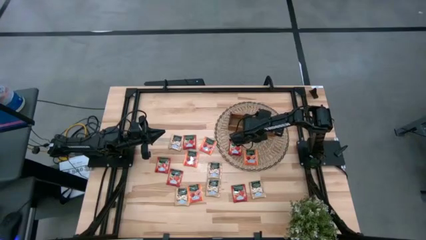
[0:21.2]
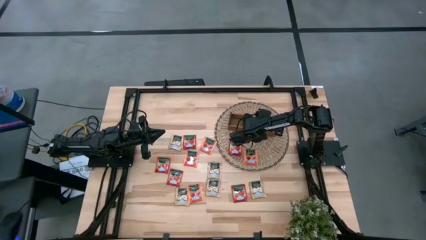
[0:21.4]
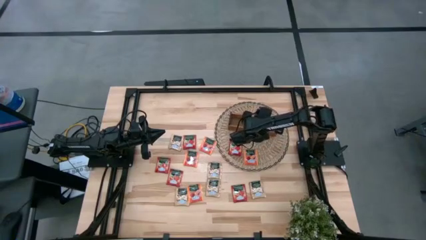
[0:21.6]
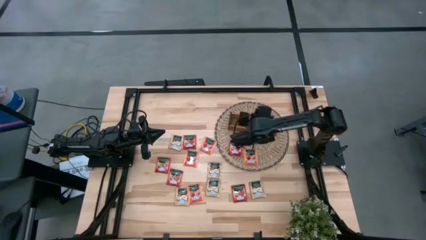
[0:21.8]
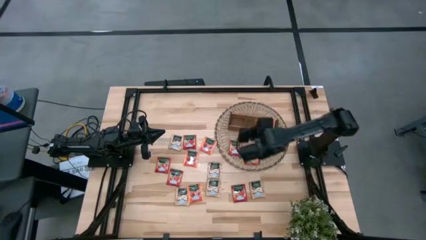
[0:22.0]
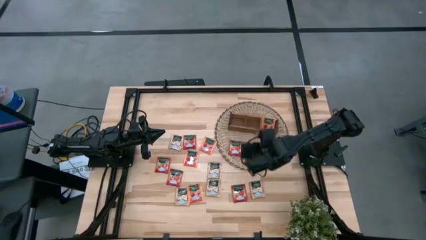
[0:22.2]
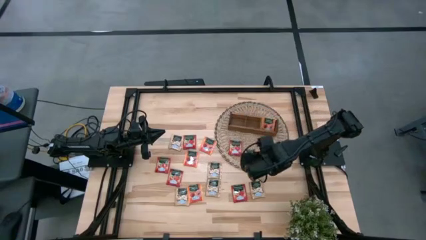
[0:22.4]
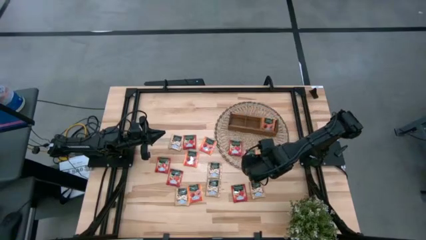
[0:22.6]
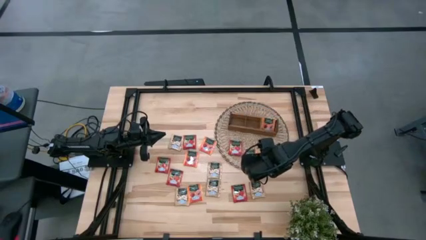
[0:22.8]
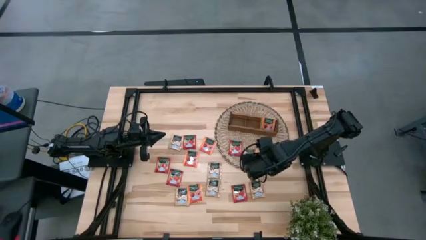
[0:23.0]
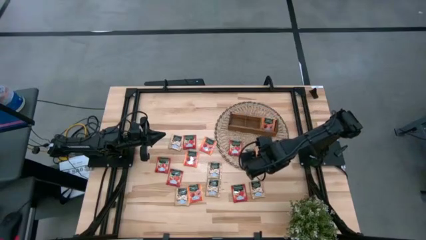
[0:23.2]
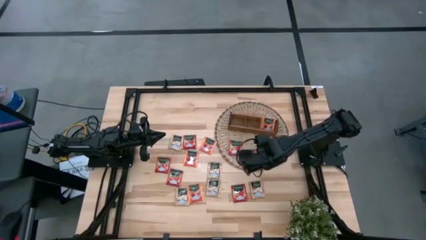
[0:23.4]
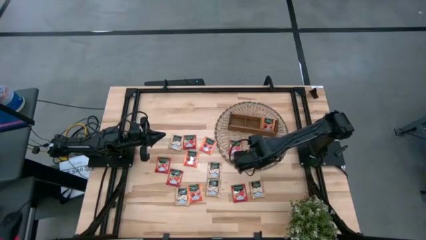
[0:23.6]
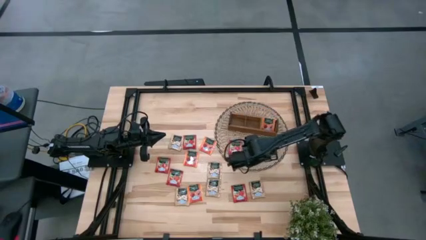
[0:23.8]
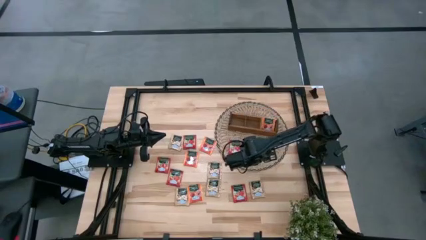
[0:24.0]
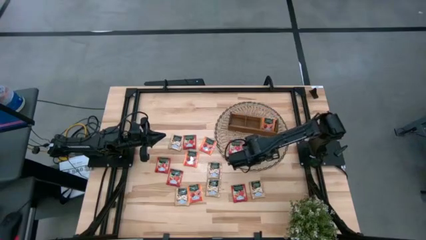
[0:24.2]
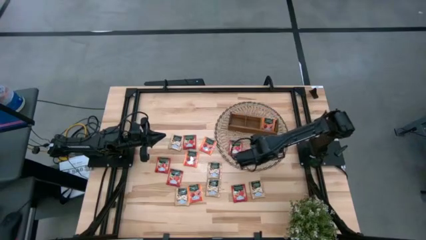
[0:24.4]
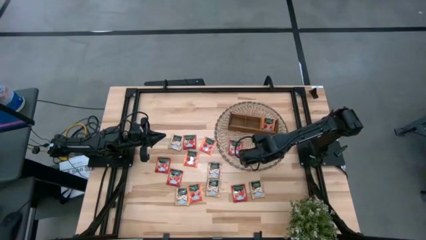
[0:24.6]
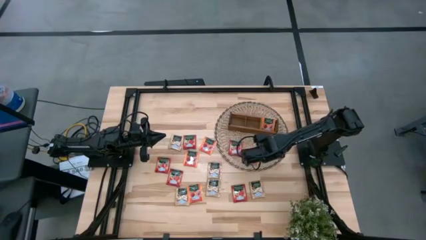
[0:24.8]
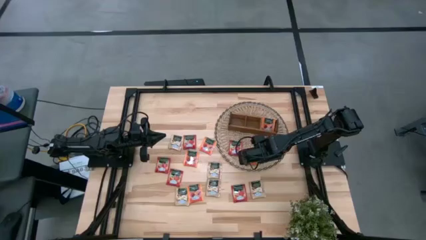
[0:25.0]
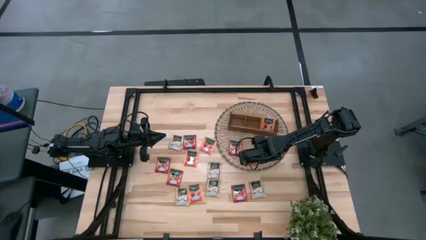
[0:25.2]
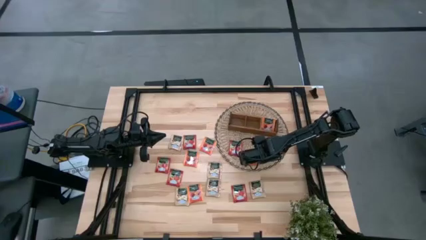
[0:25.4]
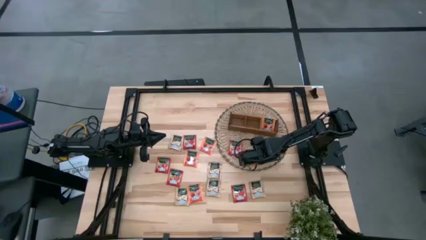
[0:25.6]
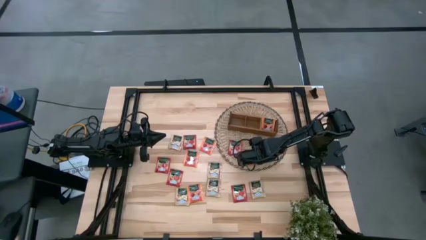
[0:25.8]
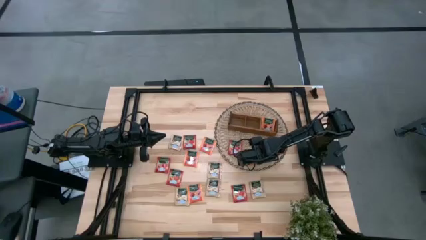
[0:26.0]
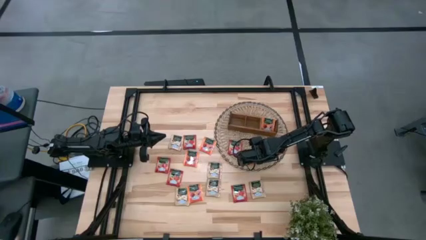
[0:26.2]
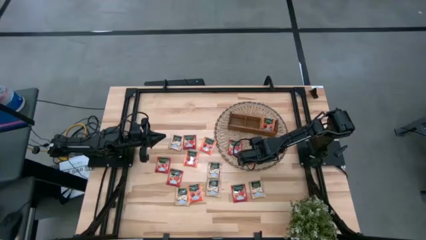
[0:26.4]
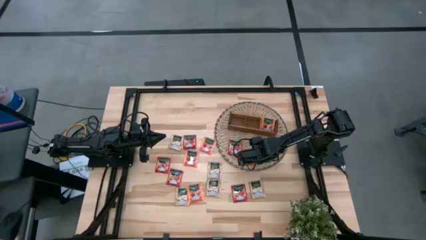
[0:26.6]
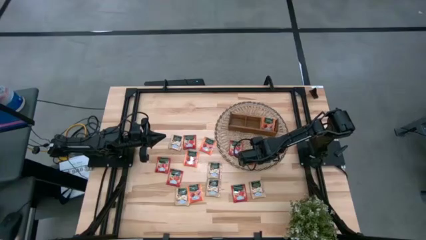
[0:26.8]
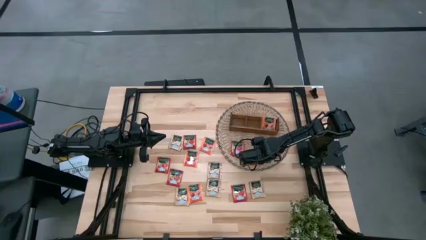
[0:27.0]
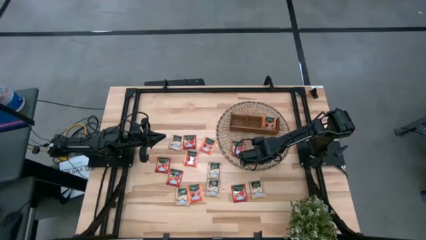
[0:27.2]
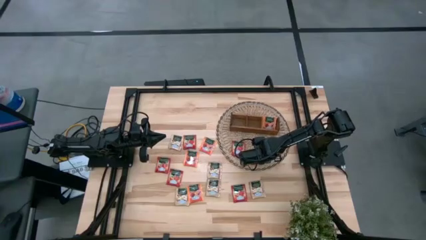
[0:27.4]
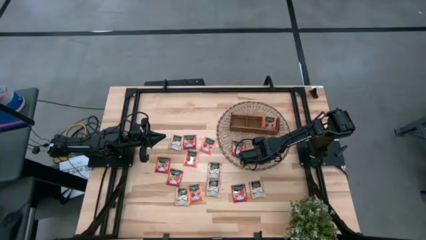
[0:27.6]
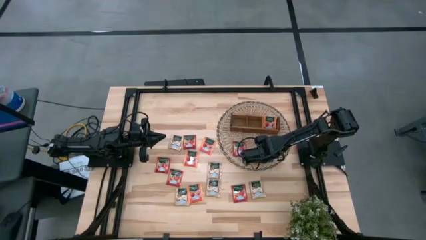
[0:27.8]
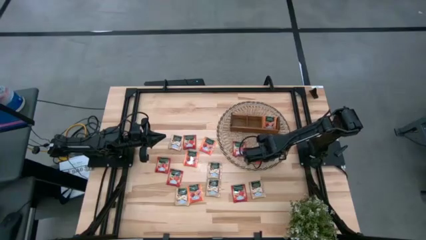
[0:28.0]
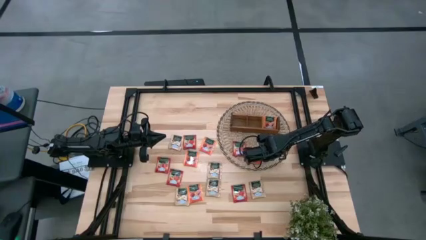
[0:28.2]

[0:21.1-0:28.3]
Task: Pick & Place Tea
Put the orange tea pack into the right compartment of the brown organizer

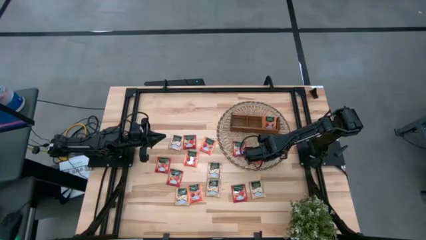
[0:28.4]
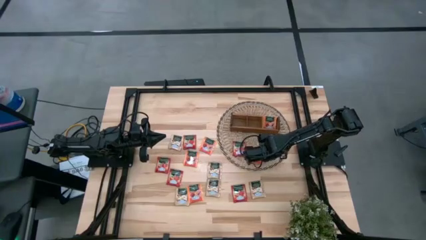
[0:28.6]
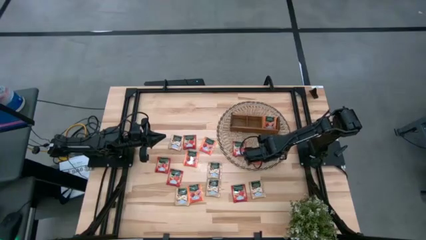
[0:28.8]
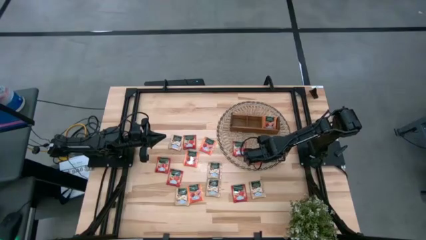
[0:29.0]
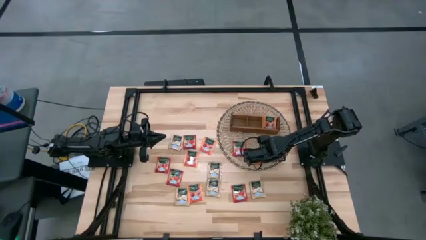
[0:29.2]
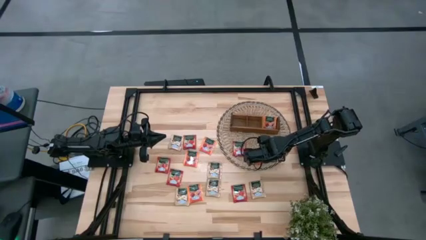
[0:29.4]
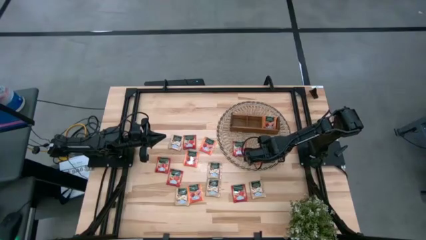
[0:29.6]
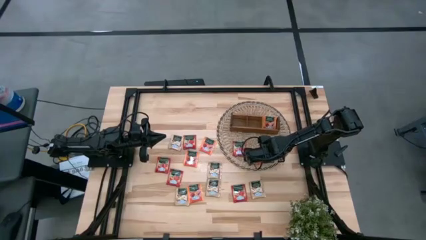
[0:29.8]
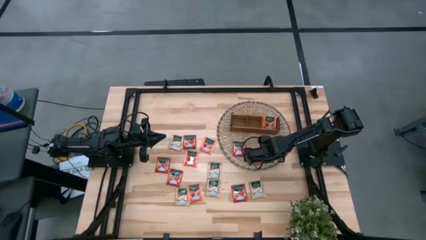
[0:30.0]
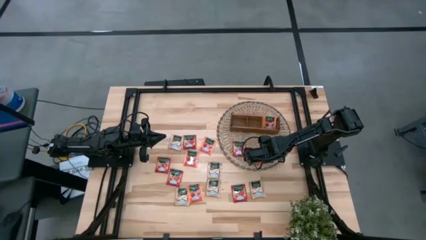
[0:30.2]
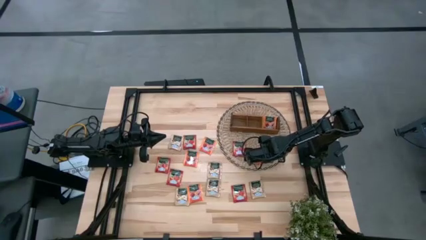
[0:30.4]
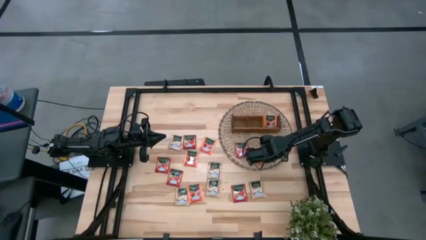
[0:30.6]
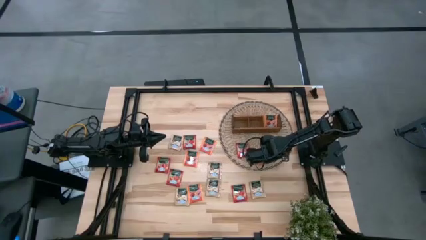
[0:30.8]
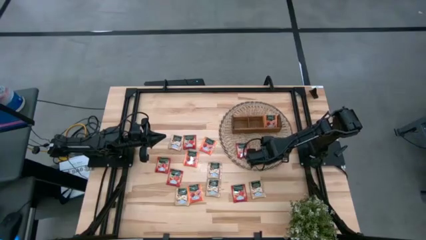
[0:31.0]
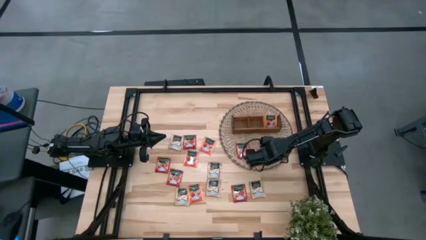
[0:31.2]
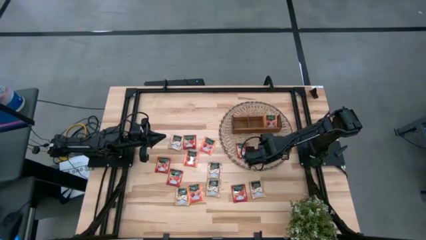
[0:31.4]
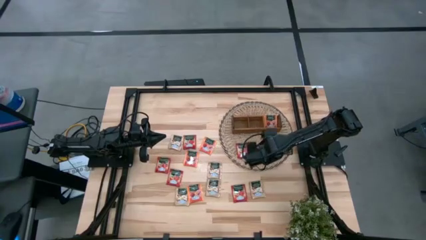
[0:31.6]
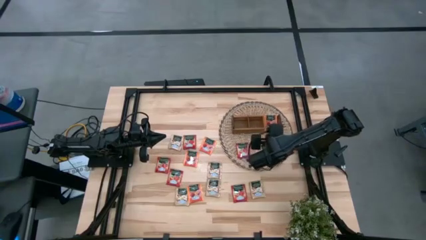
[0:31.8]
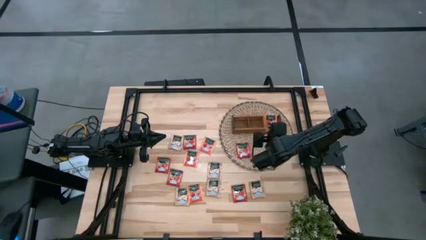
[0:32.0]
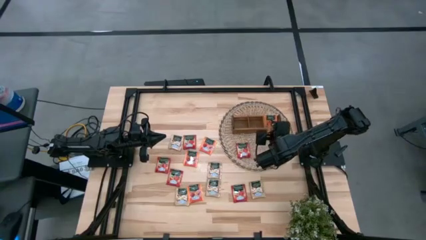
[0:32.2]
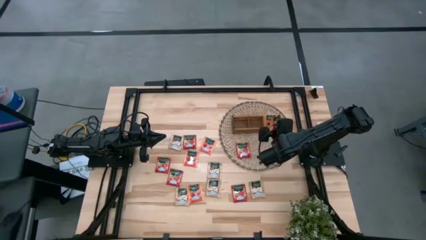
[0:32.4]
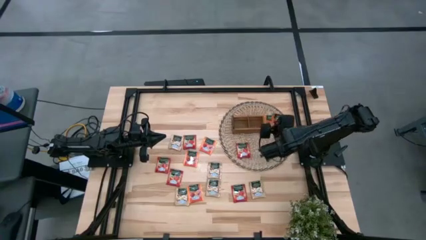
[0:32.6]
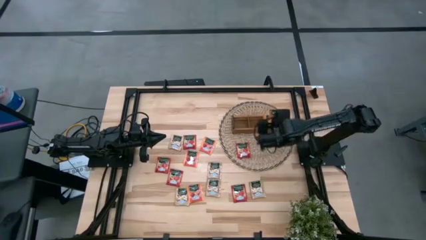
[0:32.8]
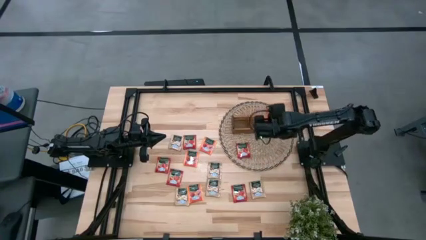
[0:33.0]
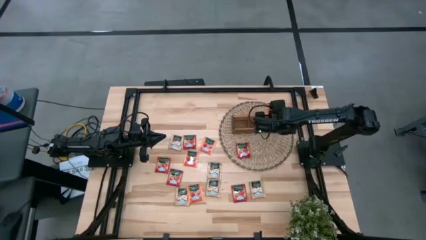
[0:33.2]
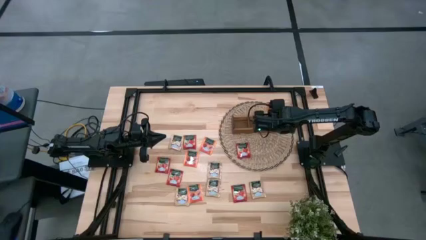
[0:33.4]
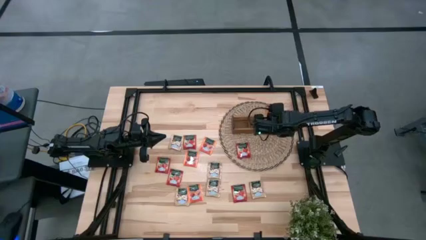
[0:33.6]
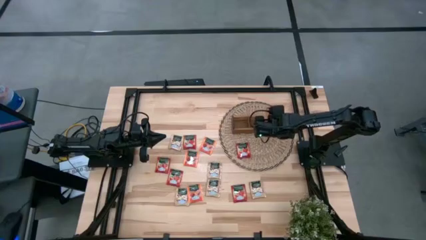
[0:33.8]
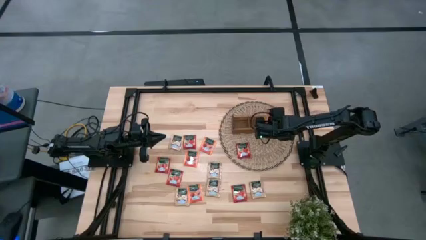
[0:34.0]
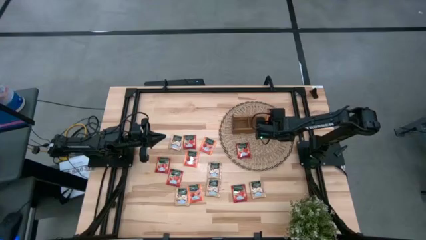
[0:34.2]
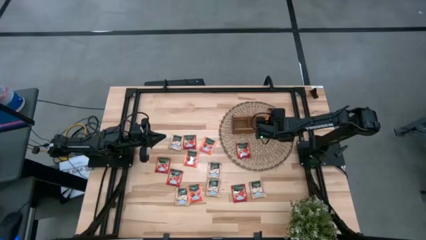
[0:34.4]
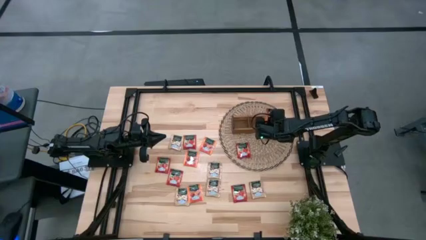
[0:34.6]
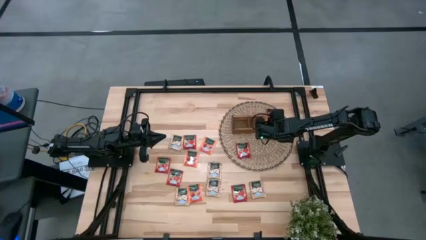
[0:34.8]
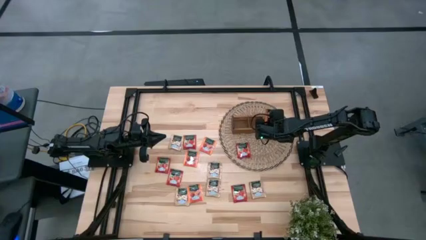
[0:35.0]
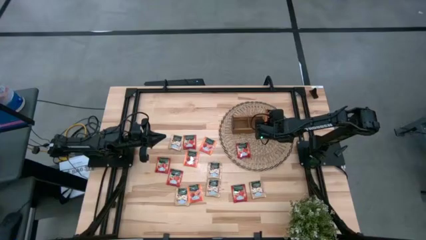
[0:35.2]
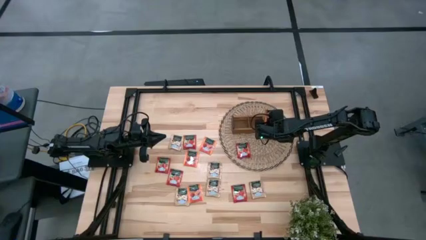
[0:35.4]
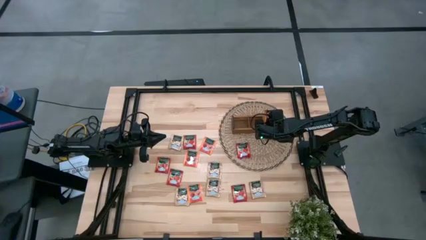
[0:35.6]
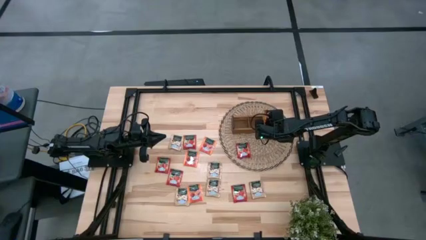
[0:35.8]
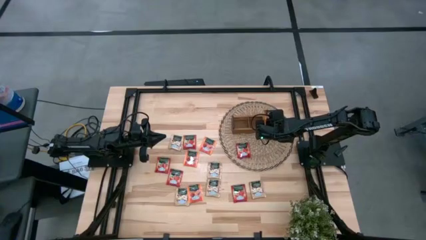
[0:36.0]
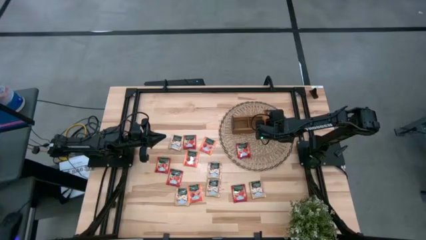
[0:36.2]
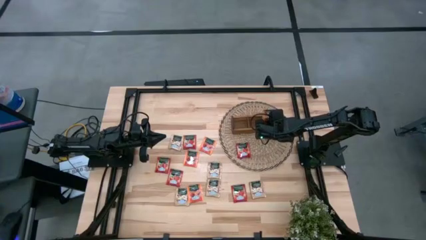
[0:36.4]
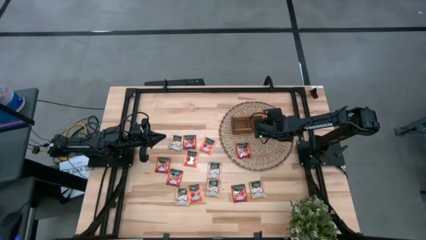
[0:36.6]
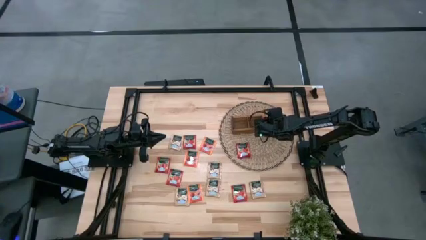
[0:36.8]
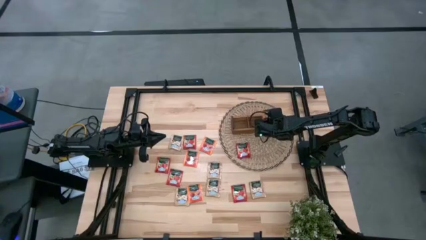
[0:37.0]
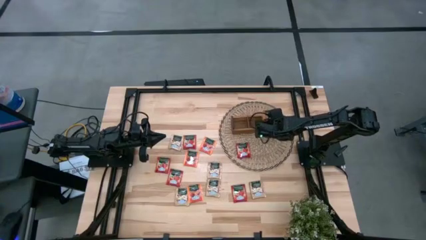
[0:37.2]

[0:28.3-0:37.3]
Put the orange tea pack into the right compartment of the brown organizer
